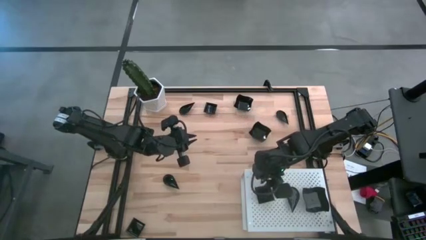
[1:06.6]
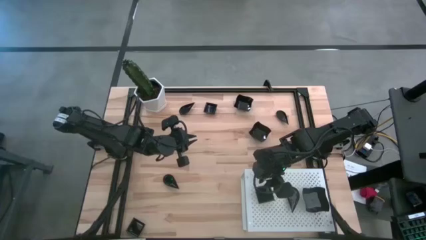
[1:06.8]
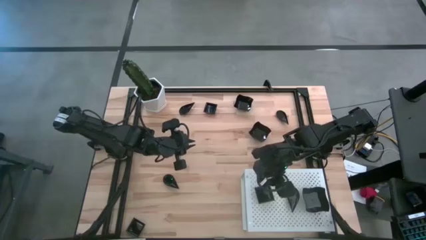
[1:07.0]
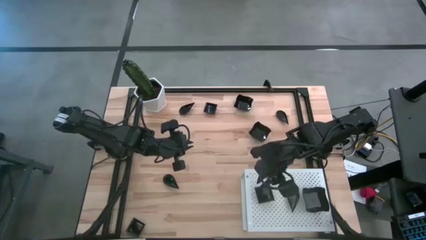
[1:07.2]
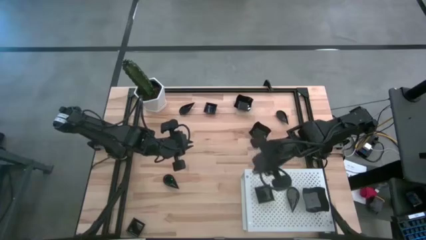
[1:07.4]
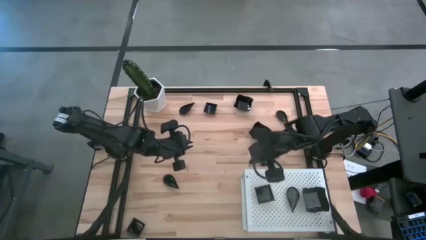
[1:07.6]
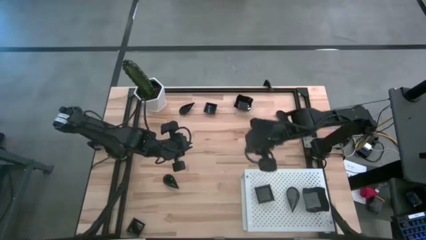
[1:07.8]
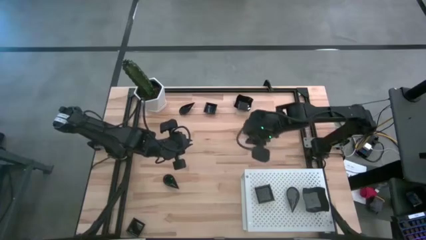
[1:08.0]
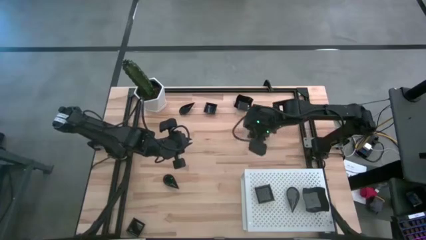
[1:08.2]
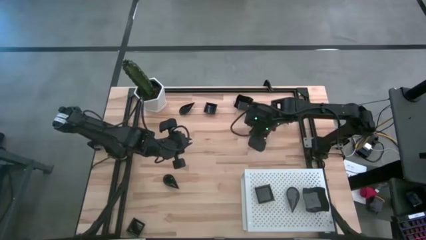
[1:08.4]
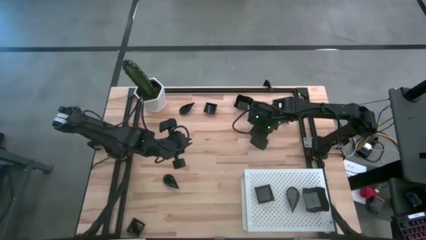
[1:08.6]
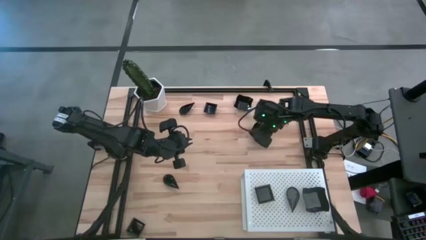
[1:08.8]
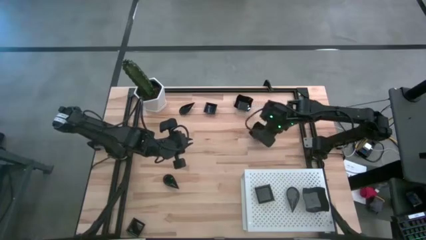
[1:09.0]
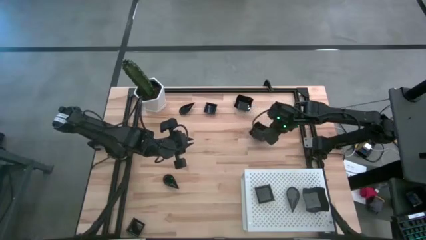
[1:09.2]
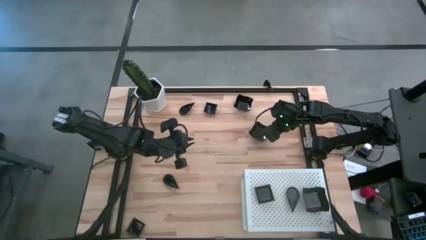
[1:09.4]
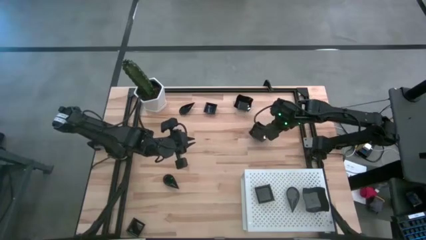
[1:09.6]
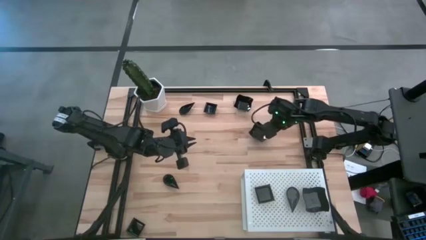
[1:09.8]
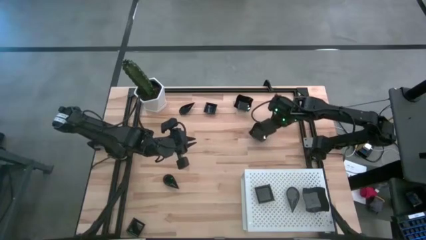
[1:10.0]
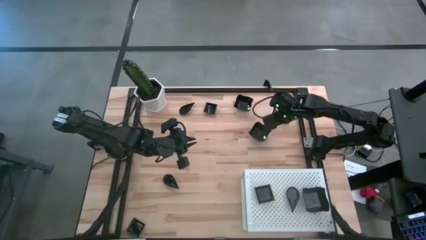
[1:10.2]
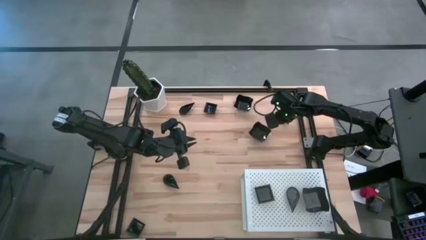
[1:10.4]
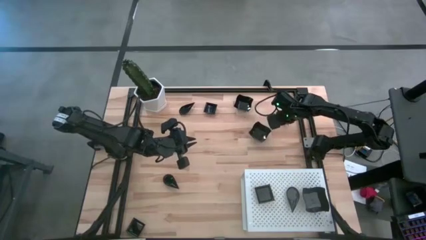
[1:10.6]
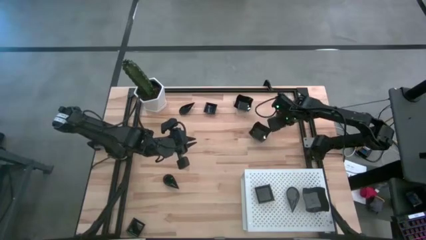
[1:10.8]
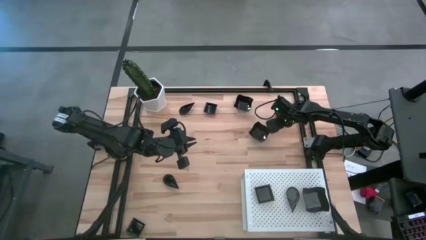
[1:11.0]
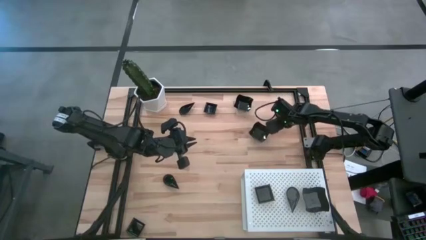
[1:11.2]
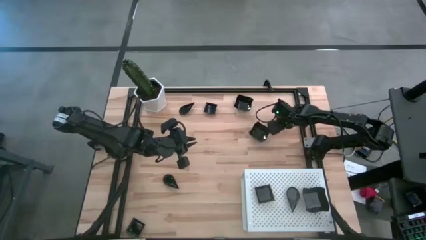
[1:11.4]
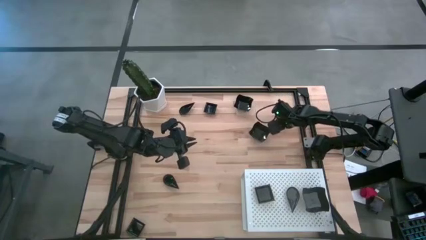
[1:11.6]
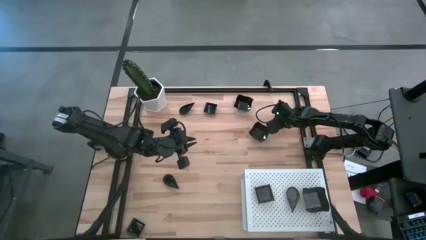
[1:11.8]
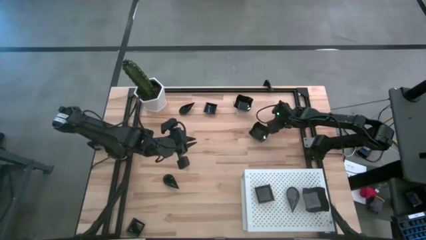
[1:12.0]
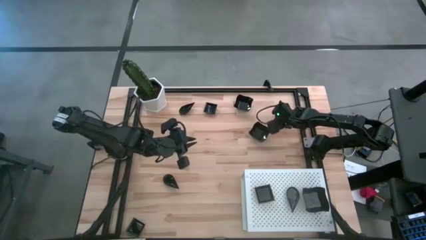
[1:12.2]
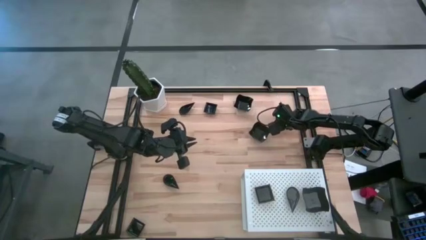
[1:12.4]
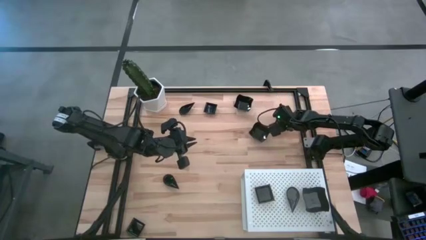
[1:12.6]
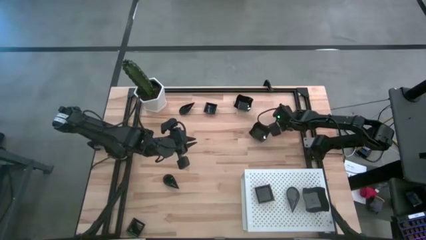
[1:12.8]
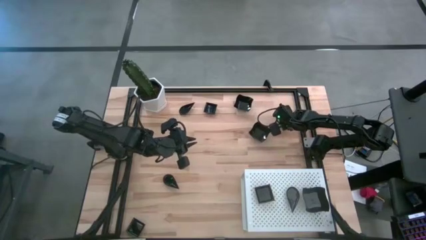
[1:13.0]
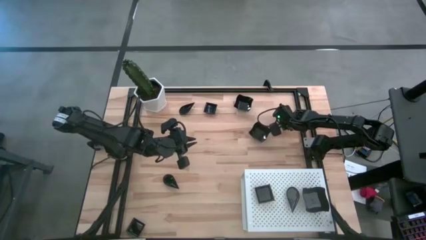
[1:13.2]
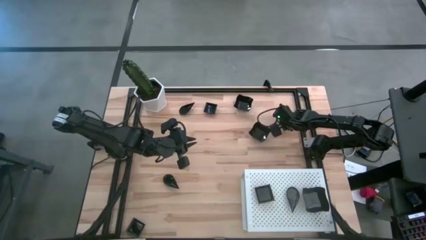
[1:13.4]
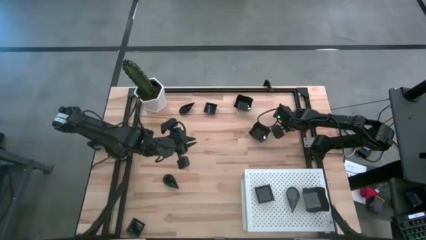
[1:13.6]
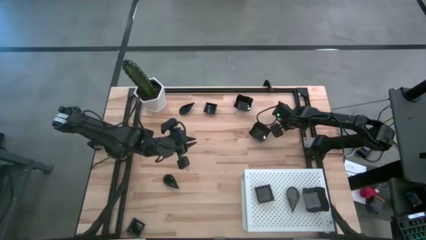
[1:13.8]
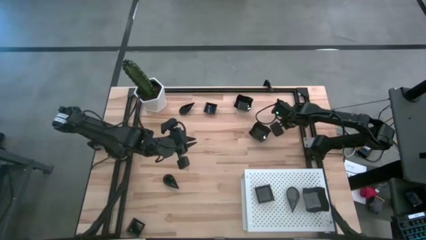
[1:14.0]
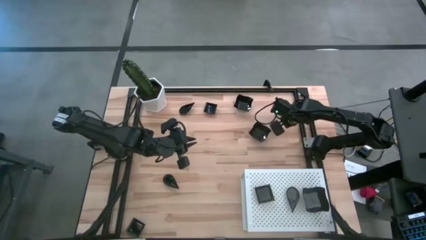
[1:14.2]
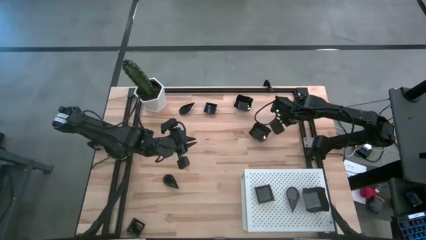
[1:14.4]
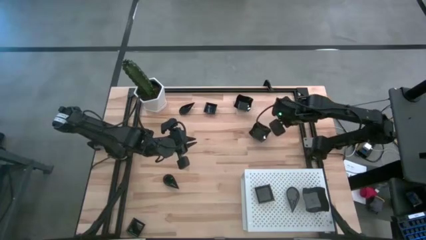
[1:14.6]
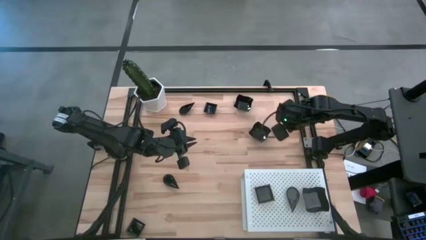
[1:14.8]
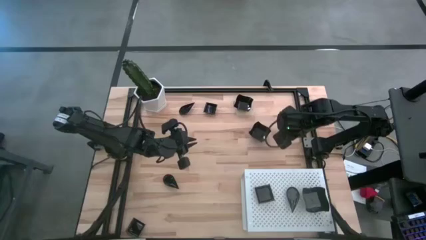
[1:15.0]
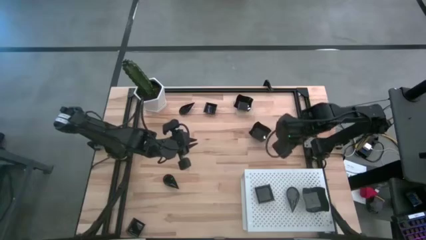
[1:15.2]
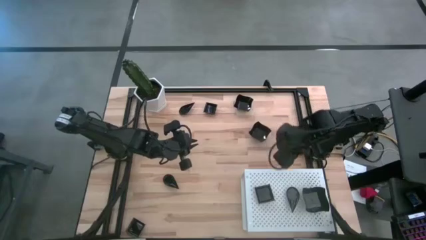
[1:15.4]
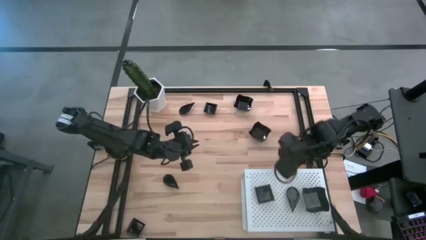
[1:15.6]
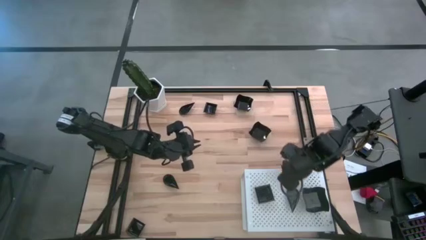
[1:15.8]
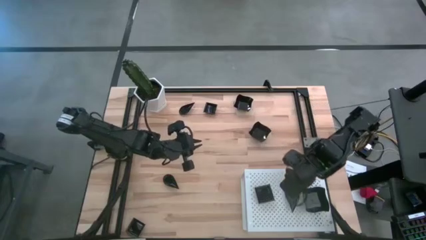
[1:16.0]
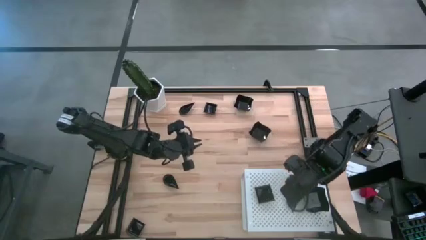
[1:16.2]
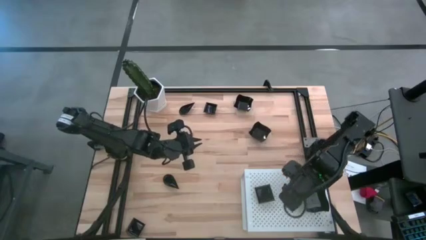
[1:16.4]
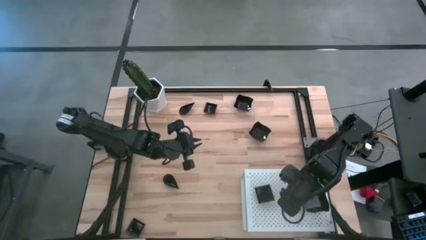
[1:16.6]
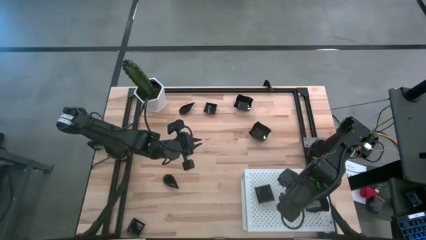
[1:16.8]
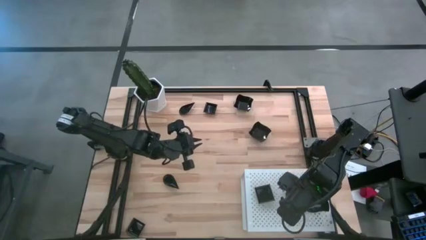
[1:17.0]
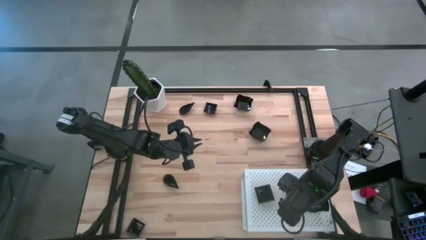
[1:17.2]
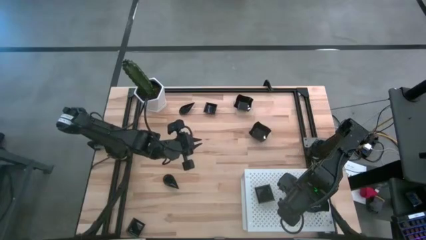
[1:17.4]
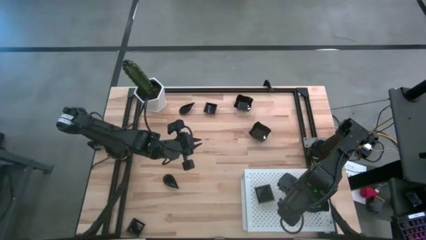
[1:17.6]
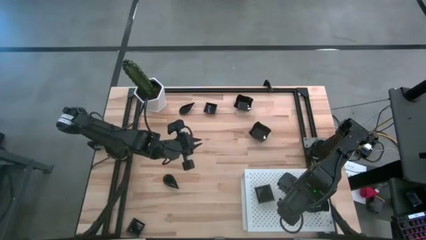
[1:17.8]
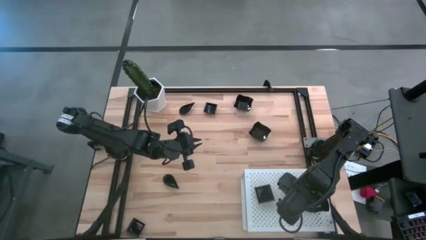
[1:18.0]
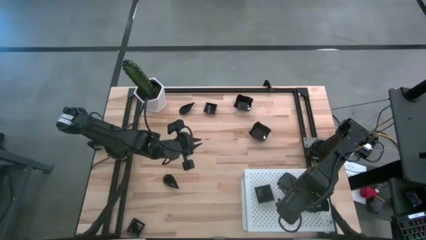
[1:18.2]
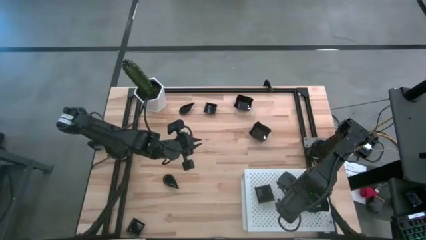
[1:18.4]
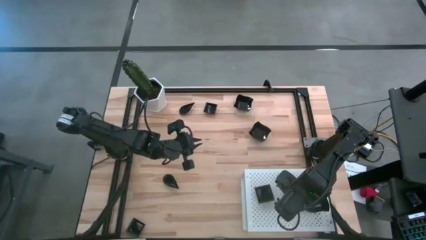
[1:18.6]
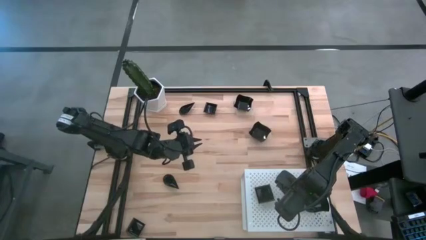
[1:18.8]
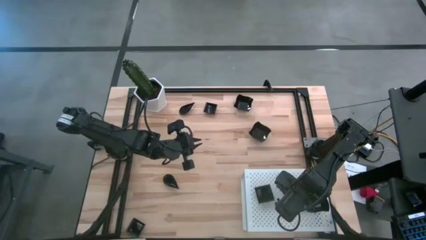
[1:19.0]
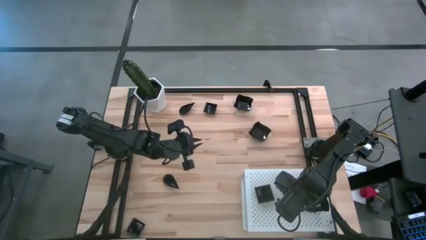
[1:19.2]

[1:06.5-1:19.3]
Task: Pick & Place Mini shaped plates
Stack the drop-shaped plate on top of the other drop-shaped plate on the shelf

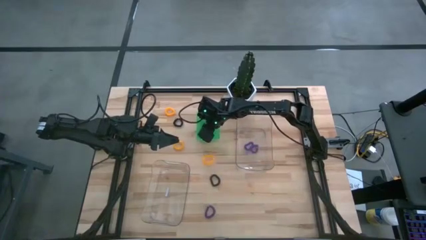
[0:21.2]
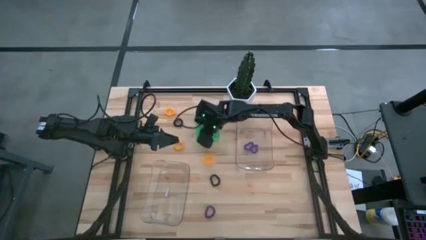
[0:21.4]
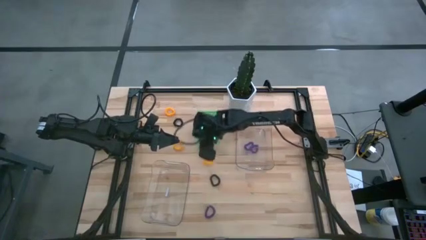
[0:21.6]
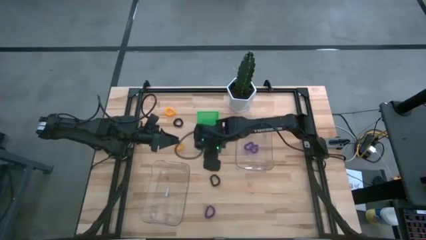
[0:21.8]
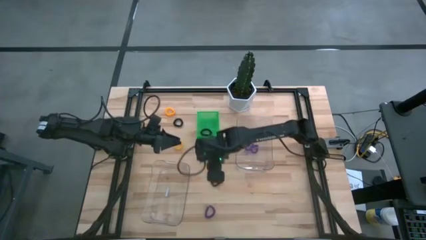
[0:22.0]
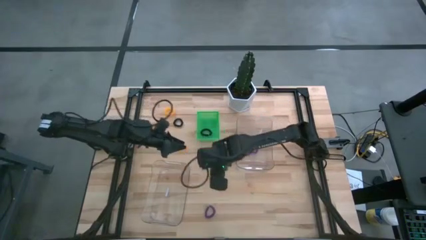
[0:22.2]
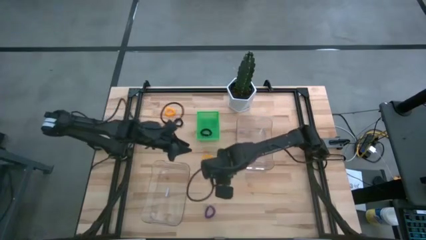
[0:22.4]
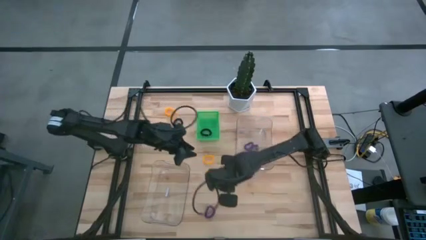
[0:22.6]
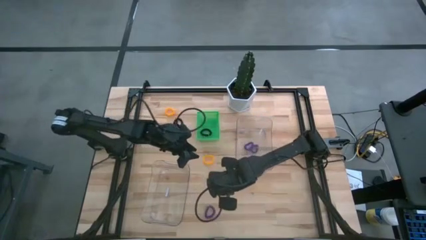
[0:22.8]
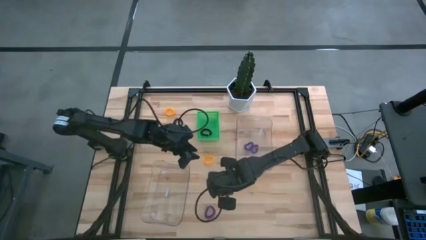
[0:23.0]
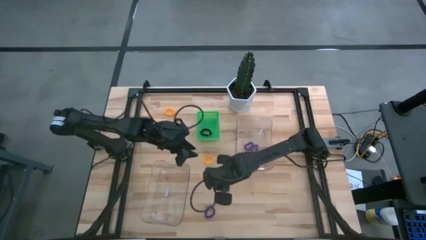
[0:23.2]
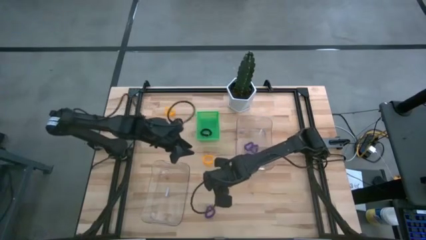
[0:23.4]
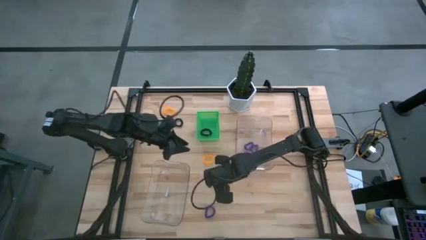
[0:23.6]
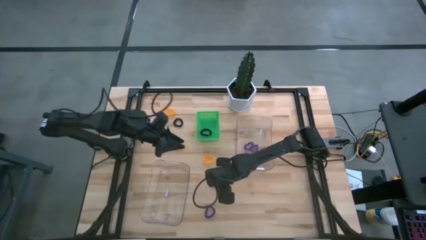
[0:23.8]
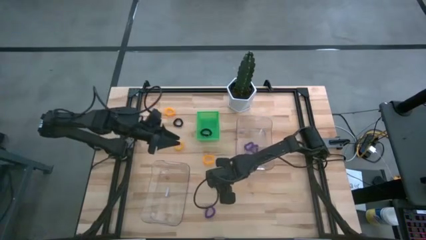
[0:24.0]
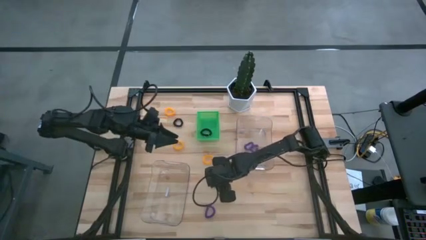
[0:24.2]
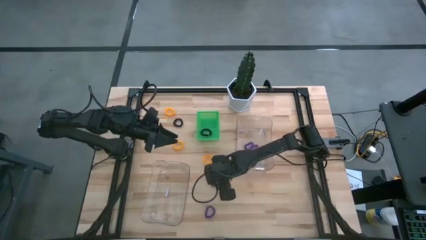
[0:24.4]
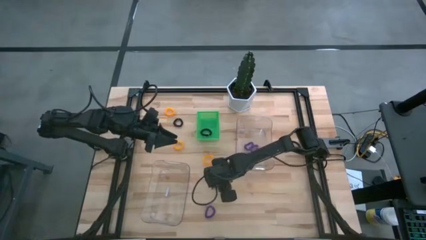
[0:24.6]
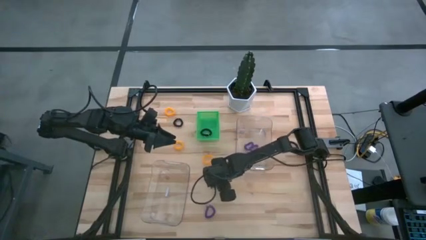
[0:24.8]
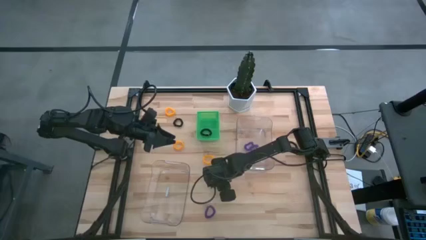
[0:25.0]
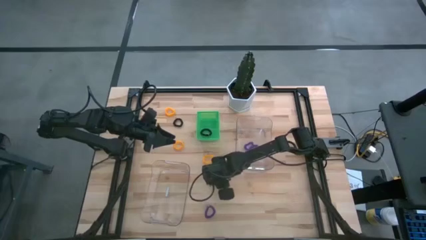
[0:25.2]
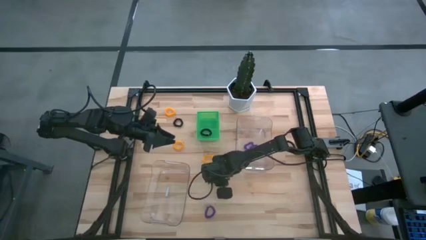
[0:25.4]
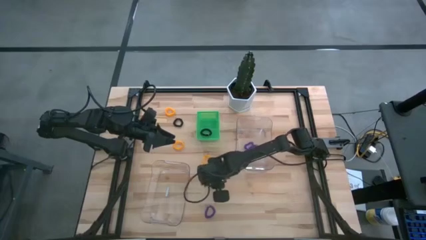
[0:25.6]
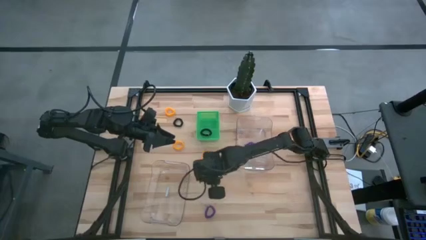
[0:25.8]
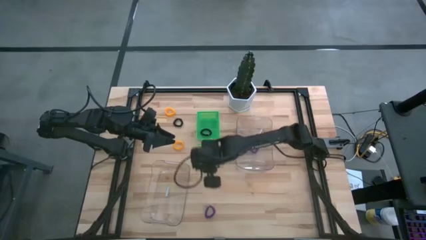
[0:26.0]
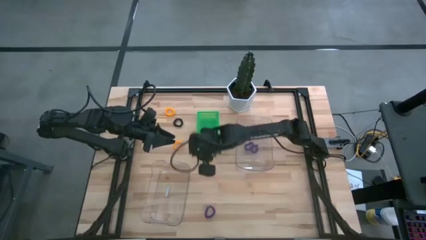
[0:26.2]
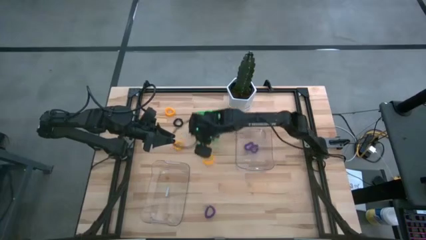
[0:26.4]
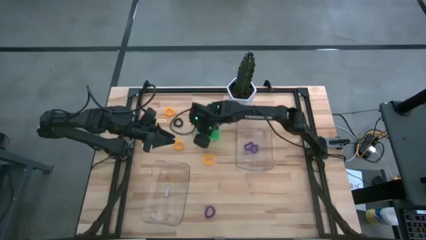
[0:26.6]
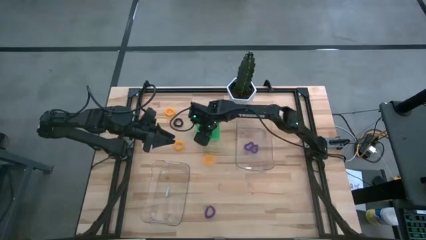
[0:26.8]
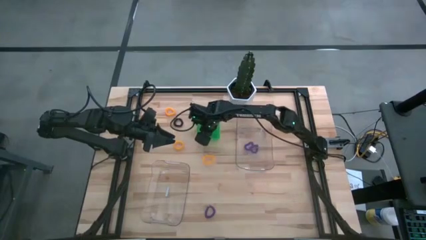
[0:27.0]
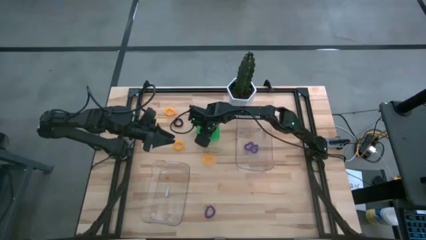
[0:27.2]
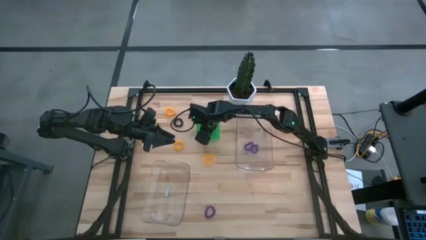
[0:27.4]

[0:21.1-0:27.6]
Task: Sort spring keychains
Put the black spring keychain into the green bin
